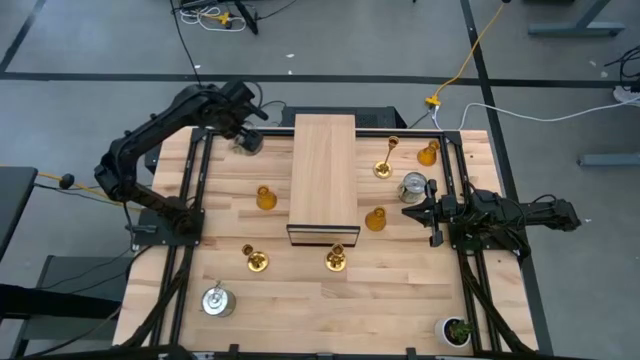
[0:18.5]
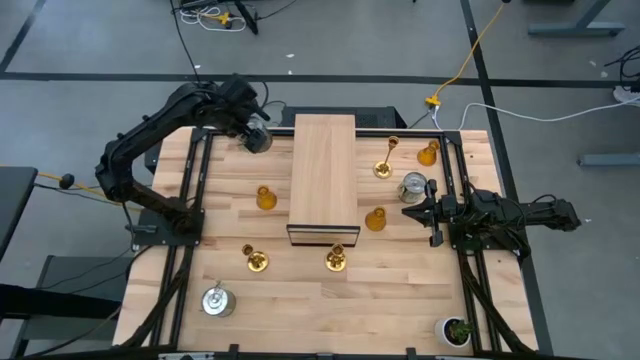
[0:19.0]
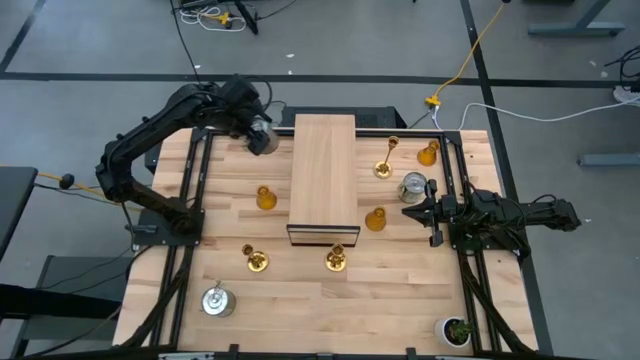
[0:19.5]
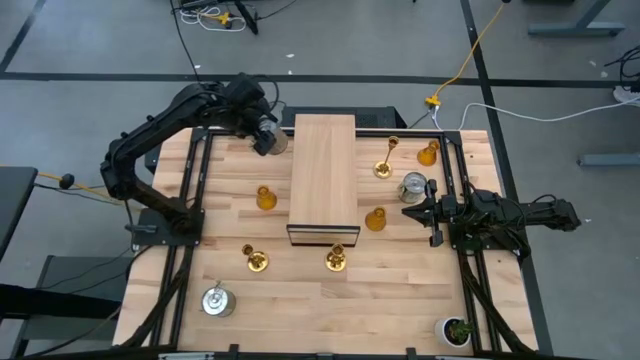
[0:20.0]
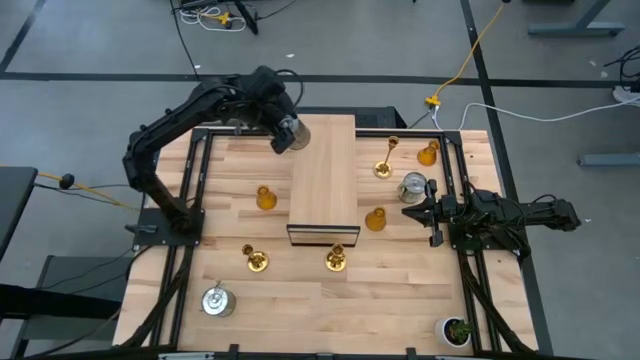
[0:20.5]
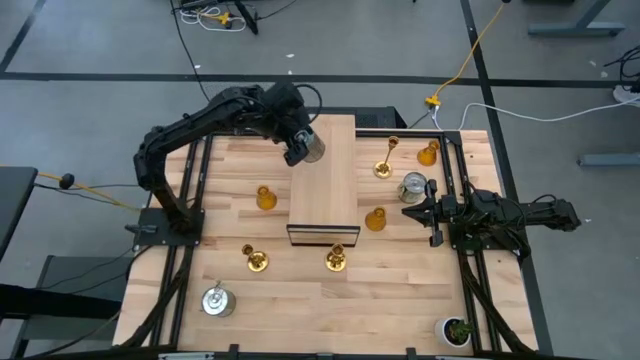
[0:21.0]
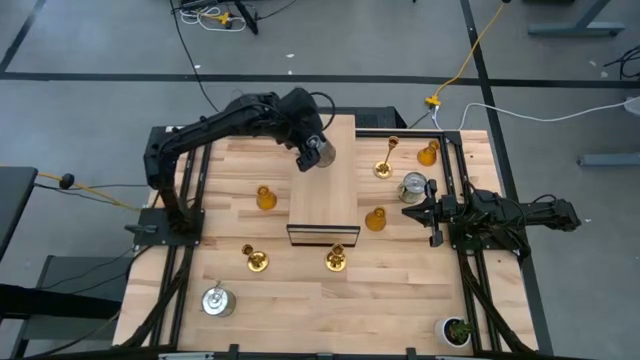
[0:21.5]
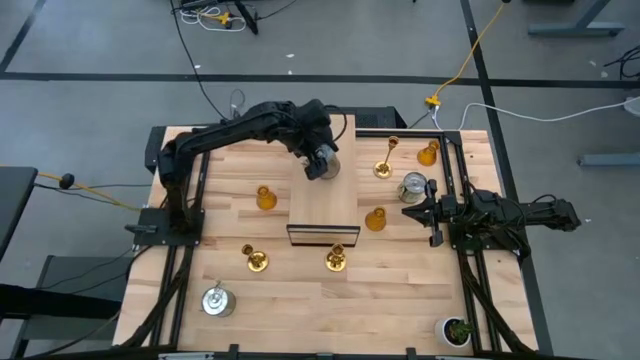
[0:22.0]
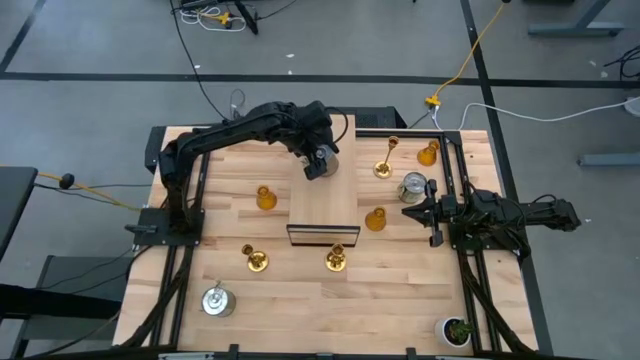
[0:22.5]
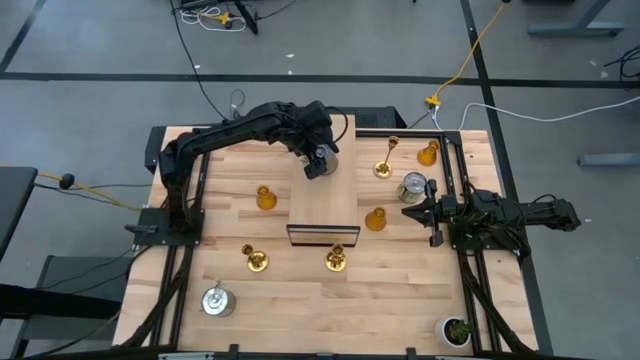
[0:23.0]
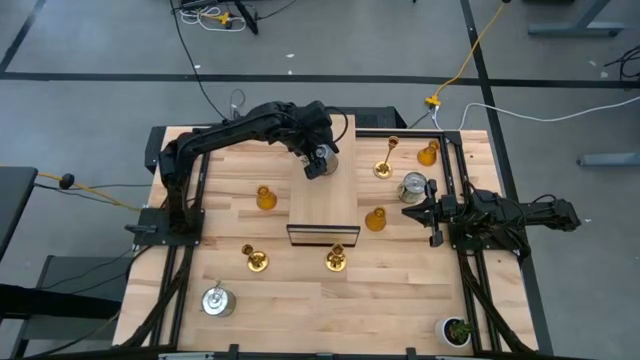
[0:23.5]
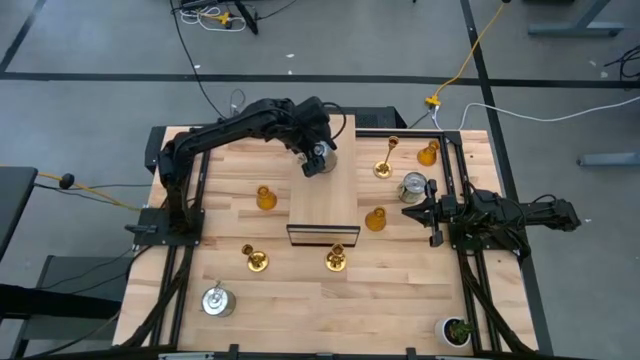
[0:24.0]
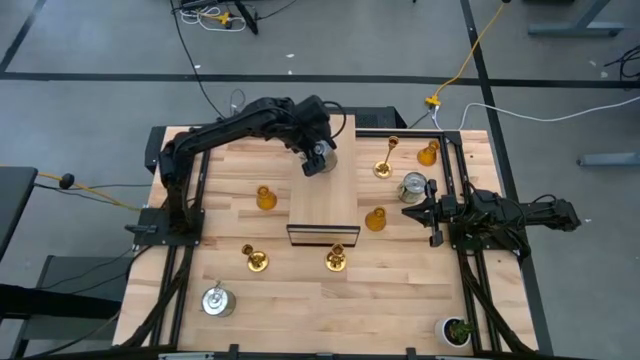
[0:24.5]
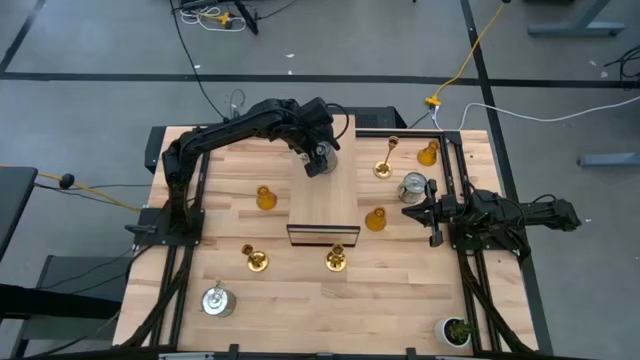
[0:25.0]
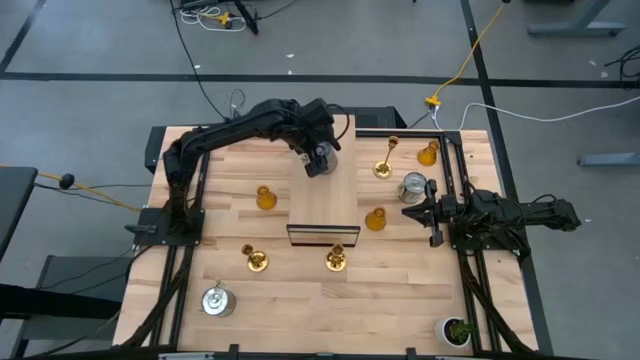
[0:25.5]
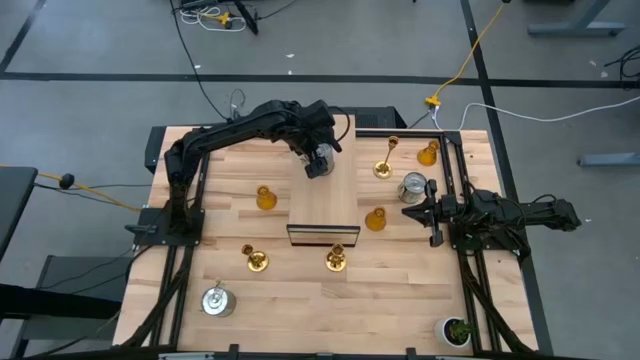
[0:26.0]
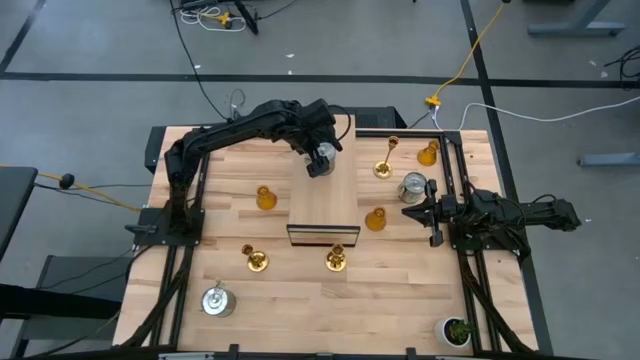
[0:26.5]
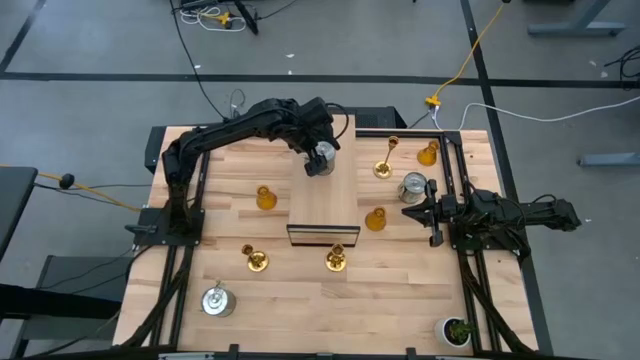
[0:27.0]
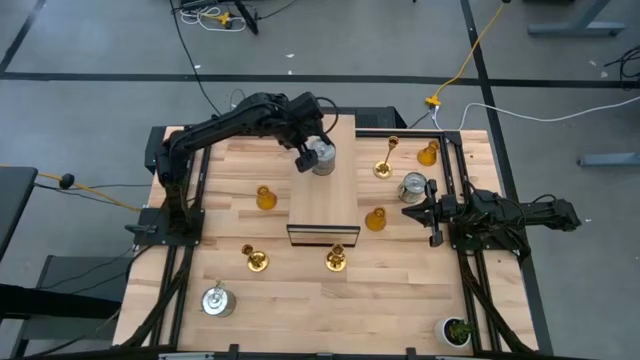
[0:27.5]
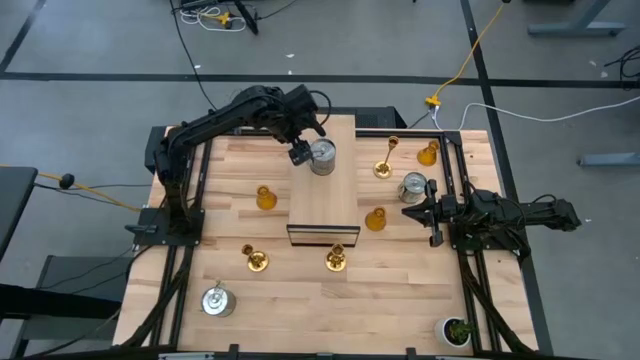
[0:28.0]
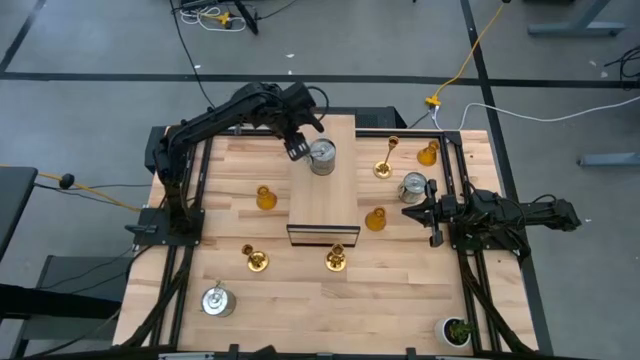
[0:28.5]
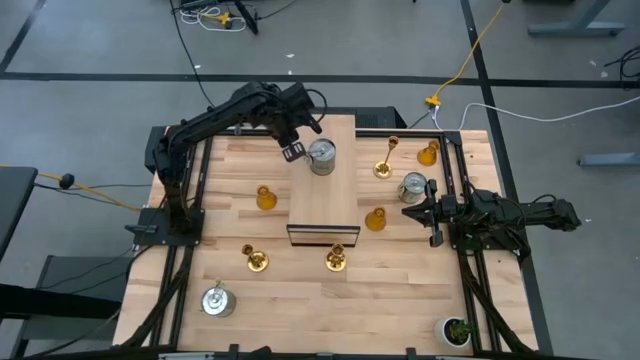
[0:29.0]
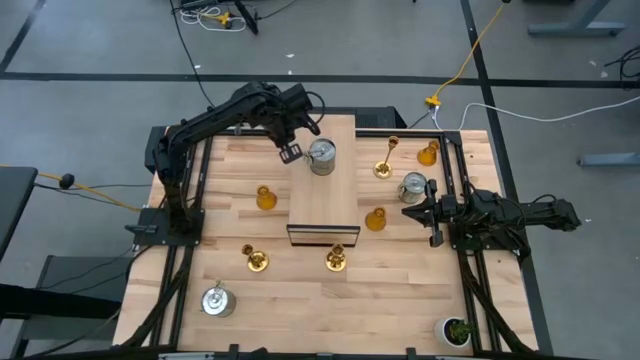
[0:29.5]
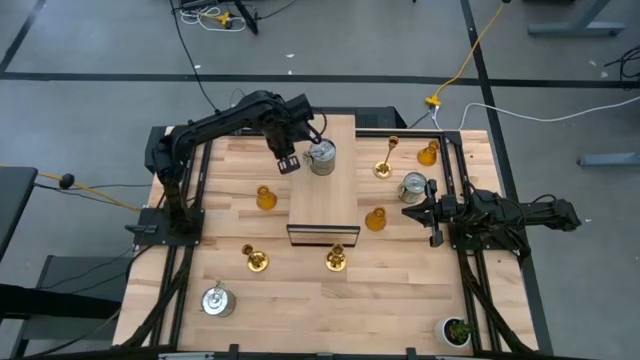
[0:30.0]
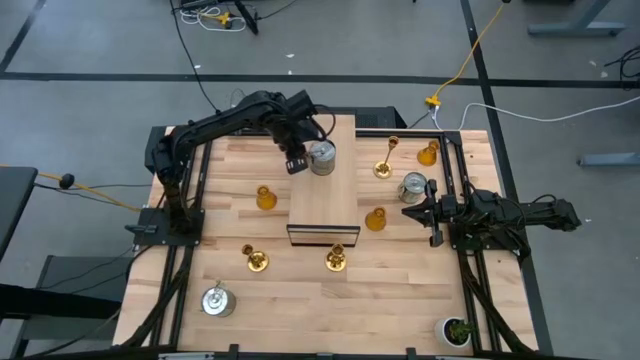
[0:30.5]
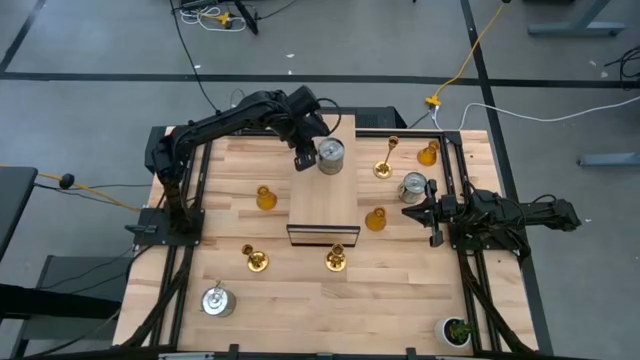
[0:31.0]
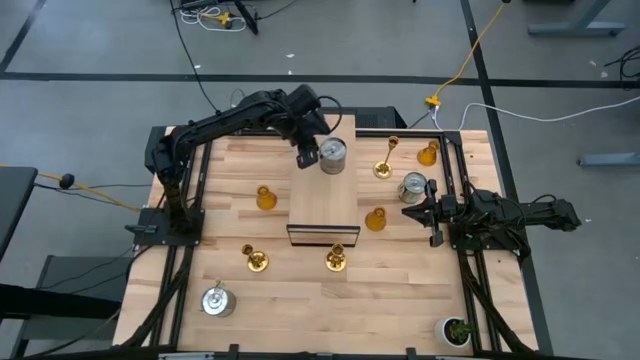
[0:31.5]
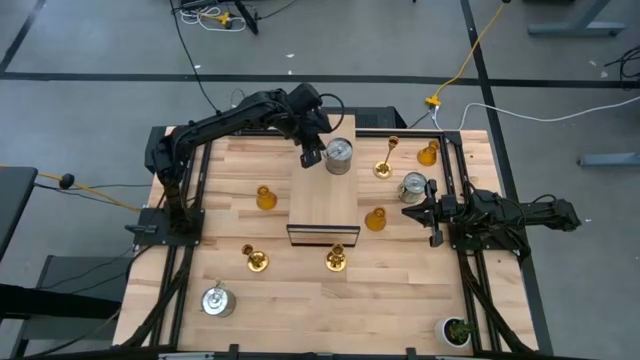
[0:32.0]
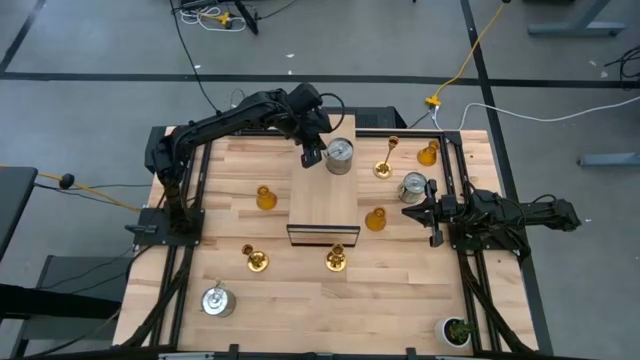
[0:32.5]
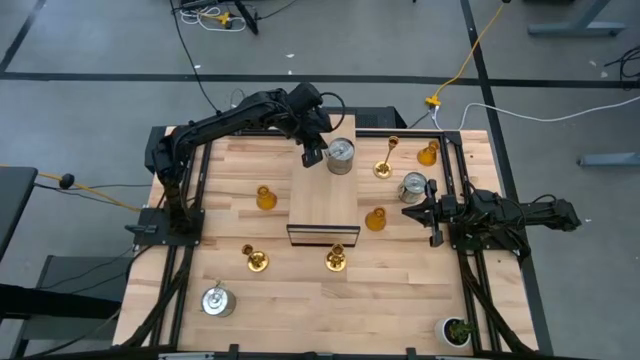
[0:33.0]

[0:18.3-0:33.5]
Task: Pick & Place candle stick holders
Put the top left scented candle can on the shelf

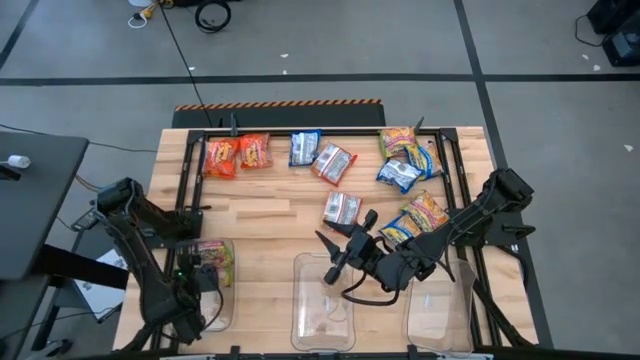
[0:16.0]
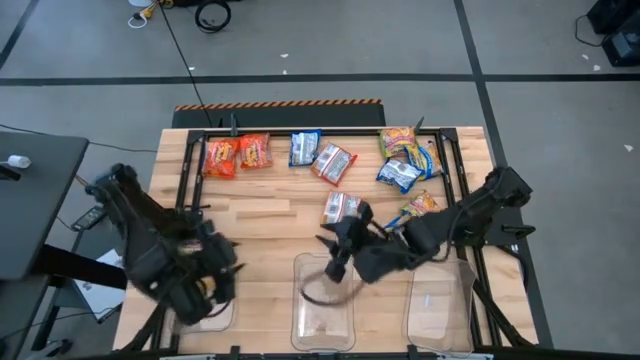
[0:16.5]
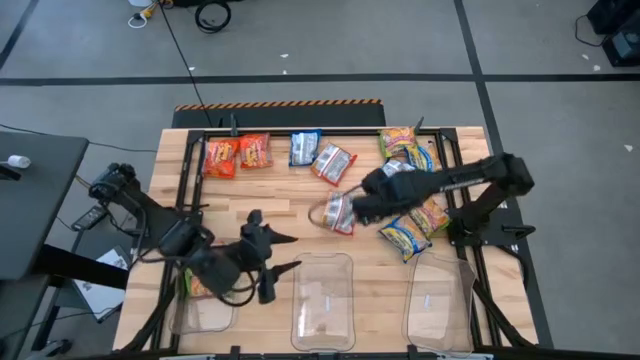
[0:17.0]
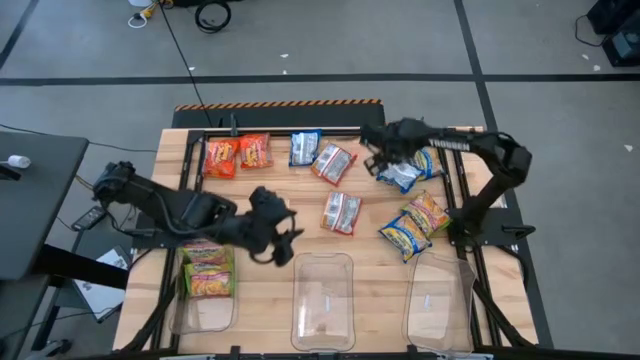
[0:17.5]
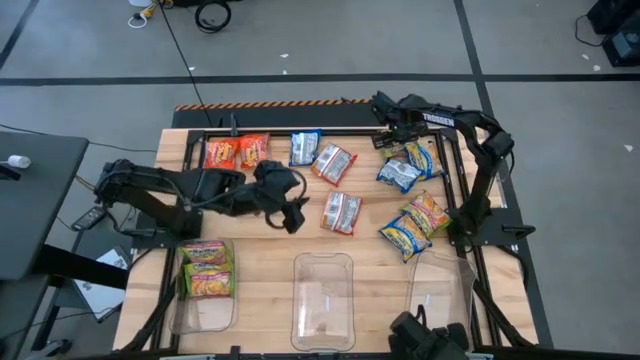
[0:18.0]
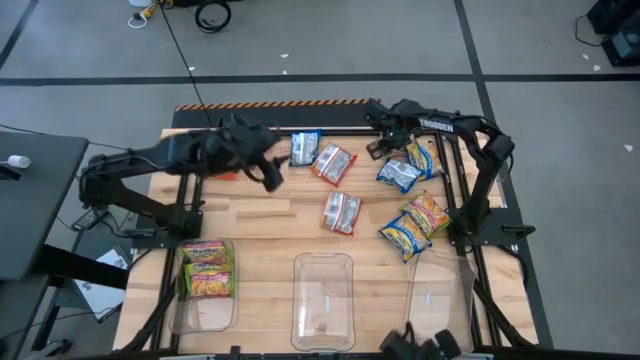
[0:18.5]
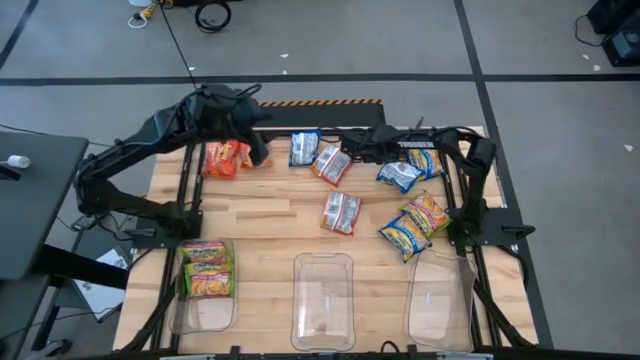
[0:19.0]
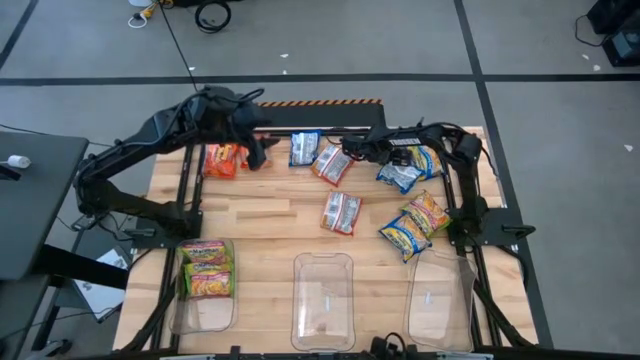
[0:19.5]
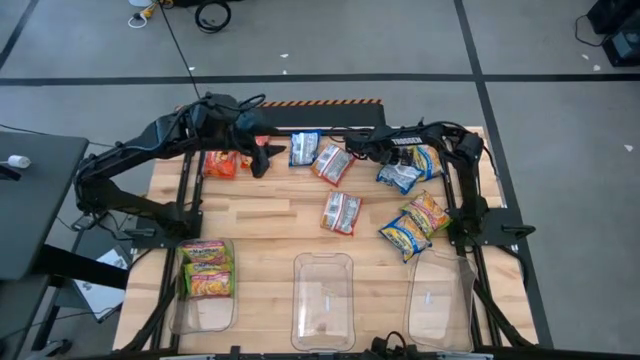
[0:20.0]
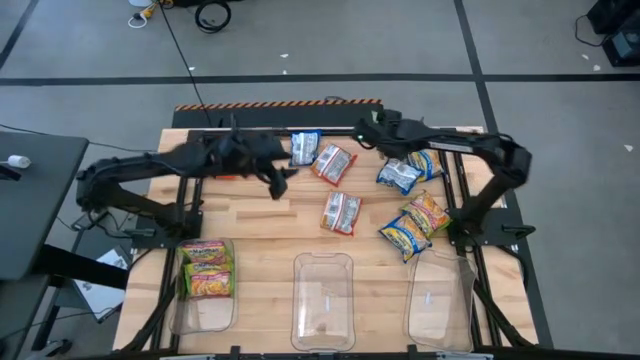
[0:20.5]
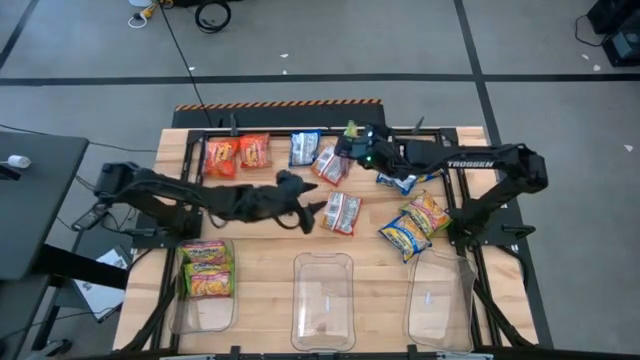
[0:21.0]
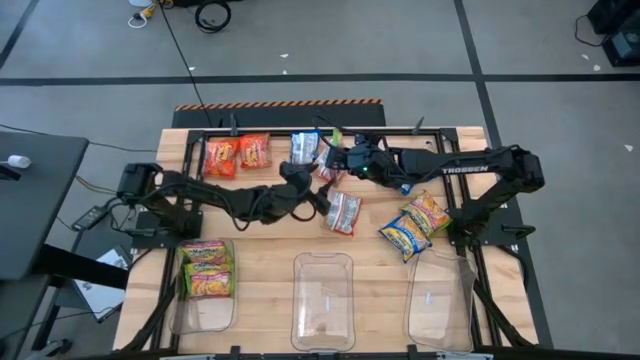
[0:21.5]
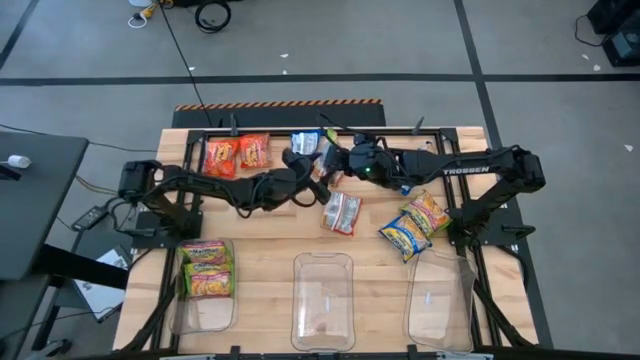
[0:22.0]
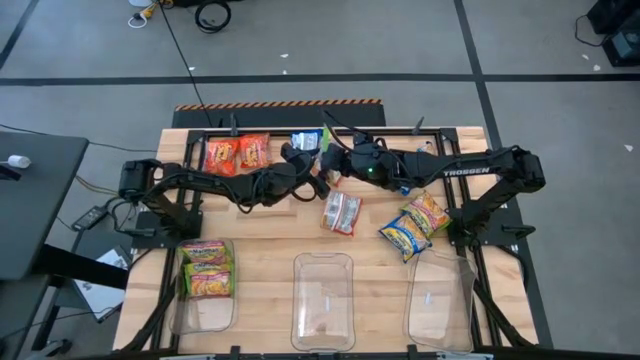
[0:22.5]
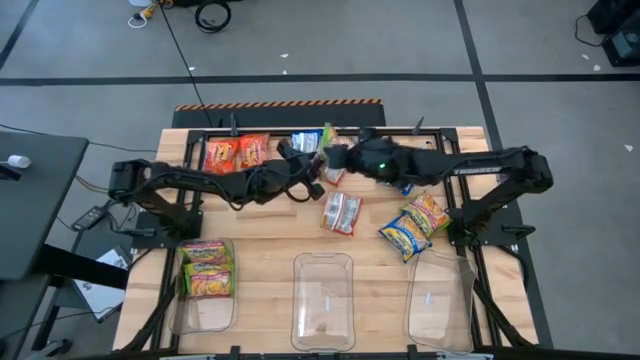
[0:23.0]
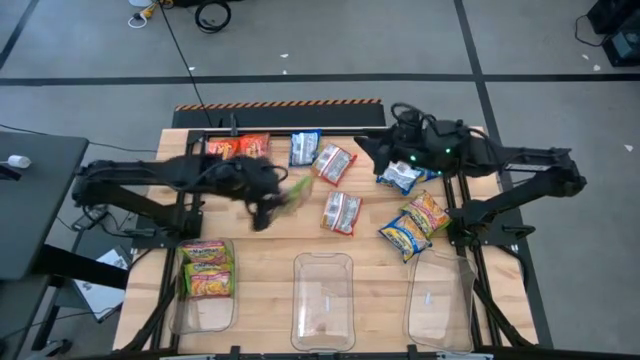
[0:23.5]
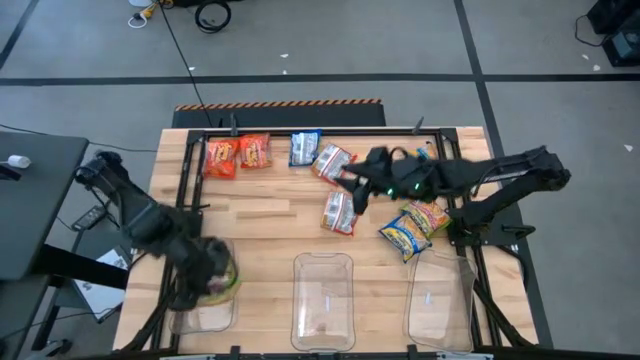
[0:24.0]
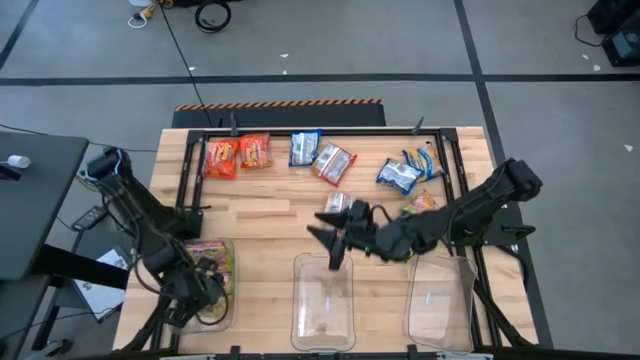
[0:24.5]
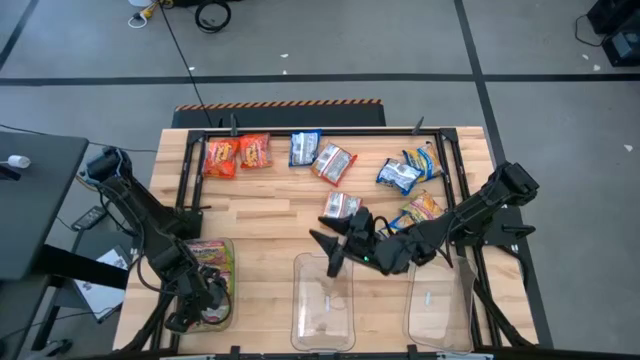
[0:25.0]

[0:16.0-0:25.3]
Task: Sort Maruchan noodles
Put the green noodle pack into the left transparent bin
